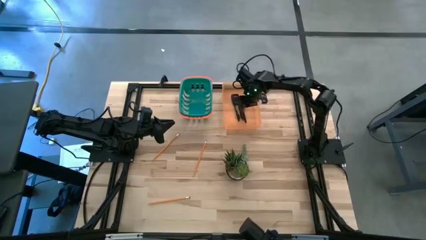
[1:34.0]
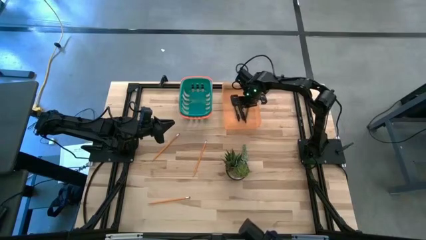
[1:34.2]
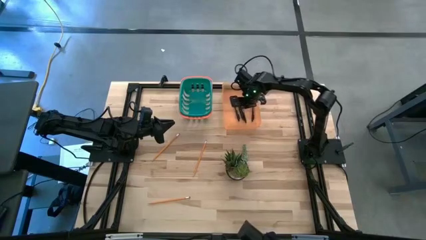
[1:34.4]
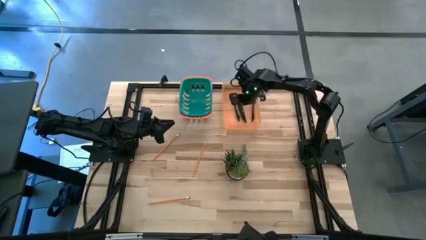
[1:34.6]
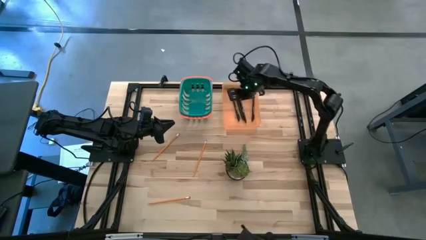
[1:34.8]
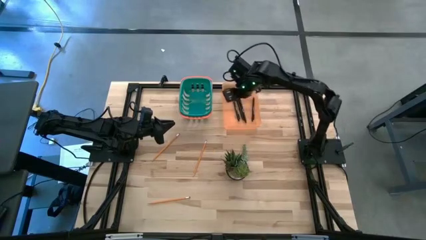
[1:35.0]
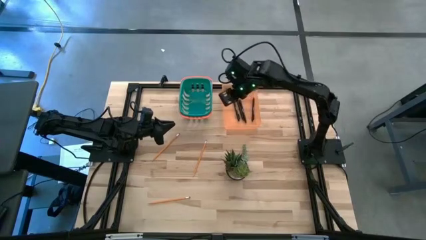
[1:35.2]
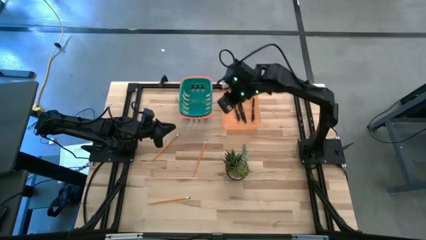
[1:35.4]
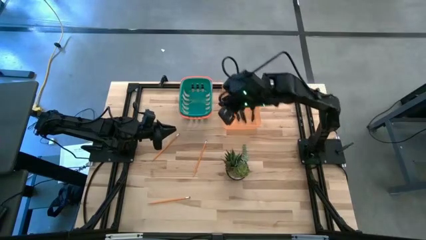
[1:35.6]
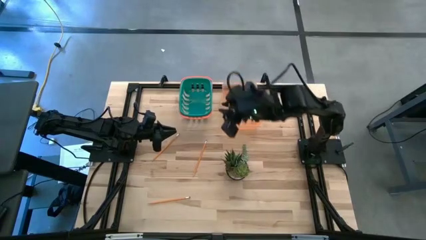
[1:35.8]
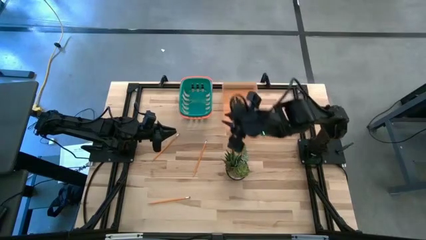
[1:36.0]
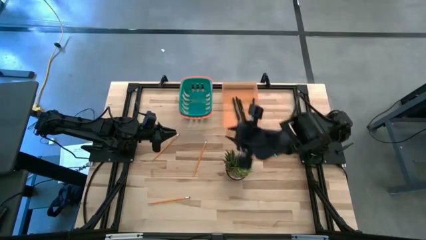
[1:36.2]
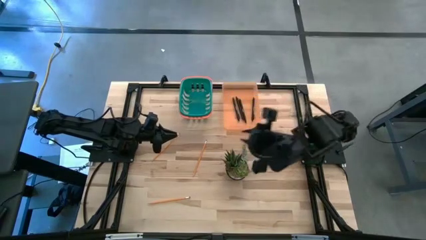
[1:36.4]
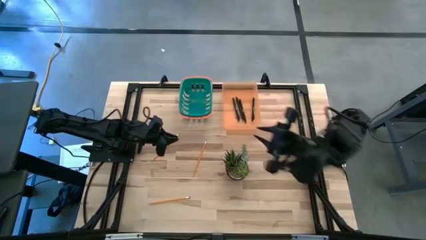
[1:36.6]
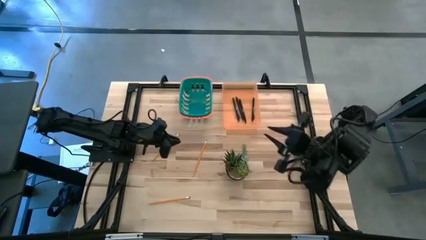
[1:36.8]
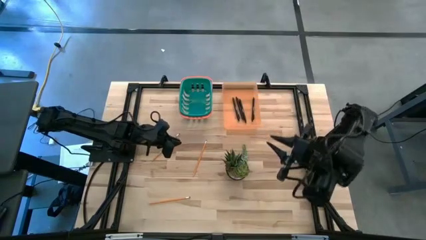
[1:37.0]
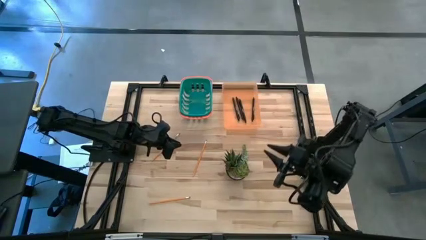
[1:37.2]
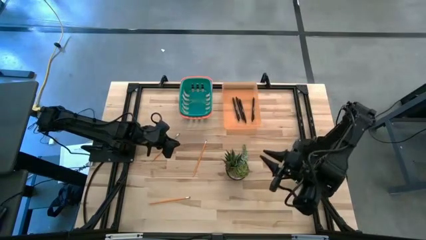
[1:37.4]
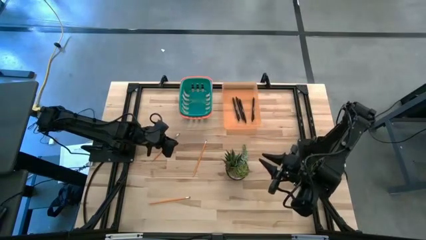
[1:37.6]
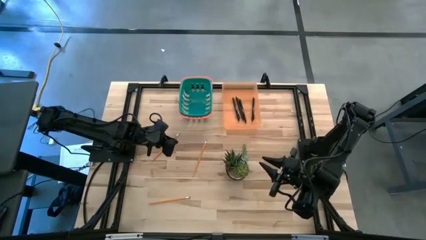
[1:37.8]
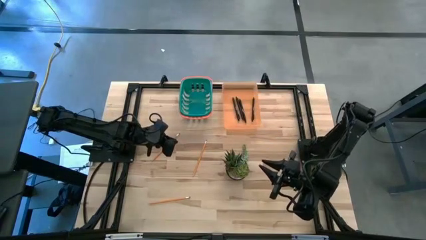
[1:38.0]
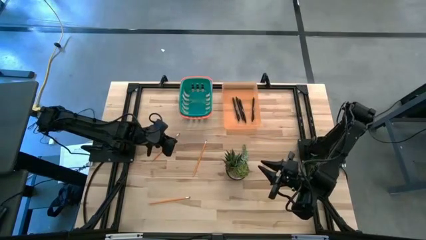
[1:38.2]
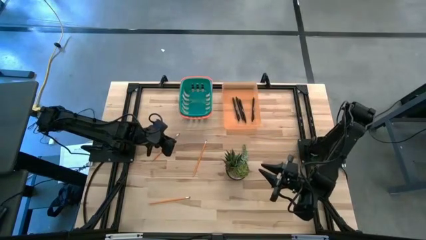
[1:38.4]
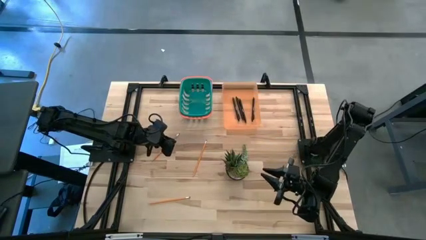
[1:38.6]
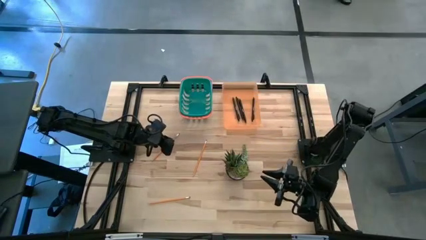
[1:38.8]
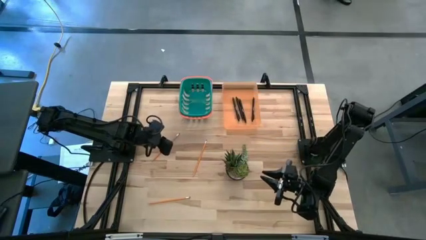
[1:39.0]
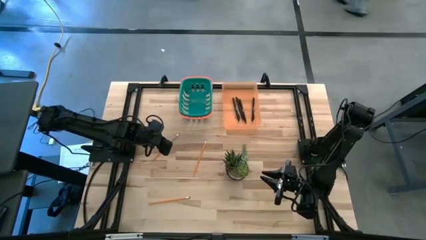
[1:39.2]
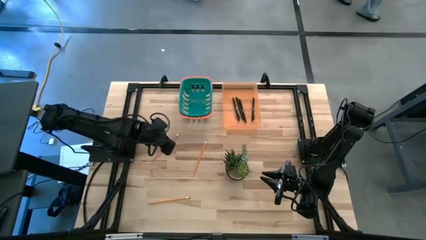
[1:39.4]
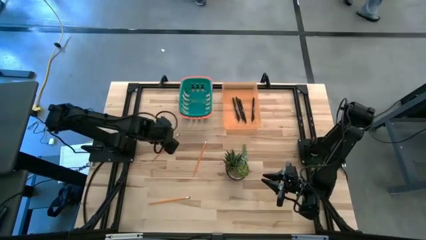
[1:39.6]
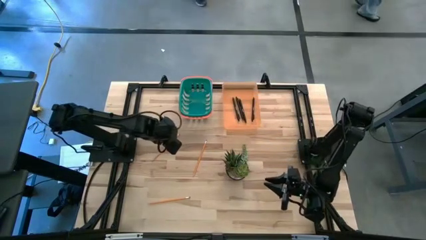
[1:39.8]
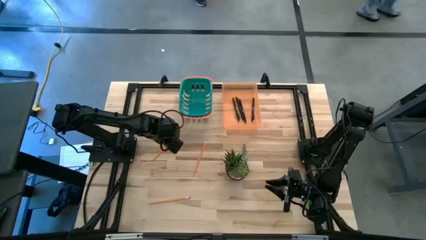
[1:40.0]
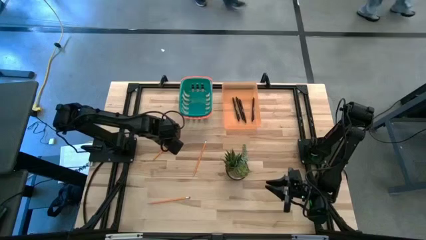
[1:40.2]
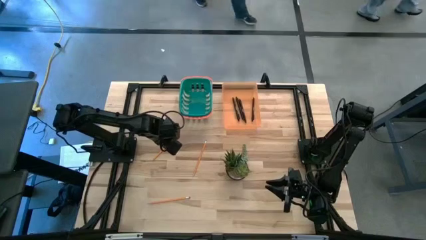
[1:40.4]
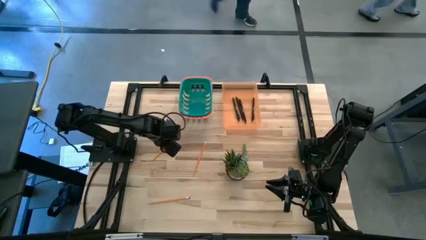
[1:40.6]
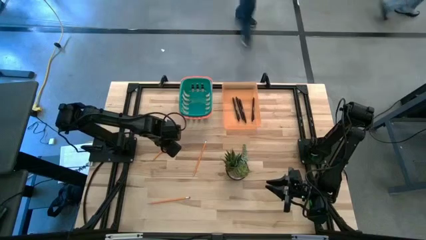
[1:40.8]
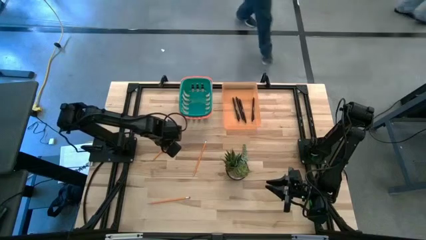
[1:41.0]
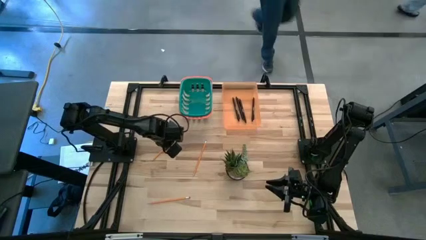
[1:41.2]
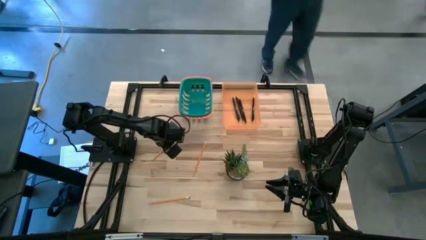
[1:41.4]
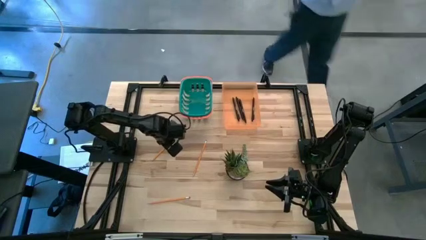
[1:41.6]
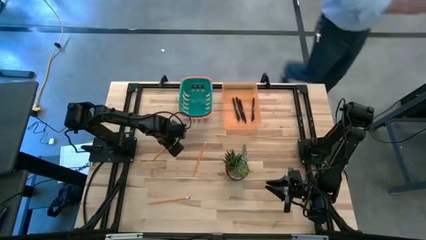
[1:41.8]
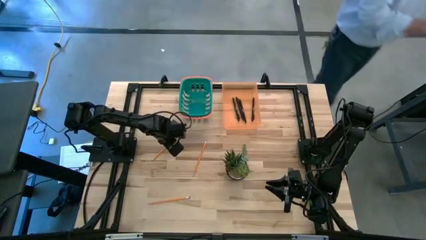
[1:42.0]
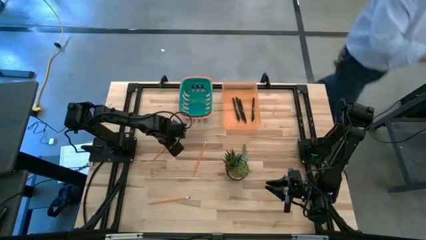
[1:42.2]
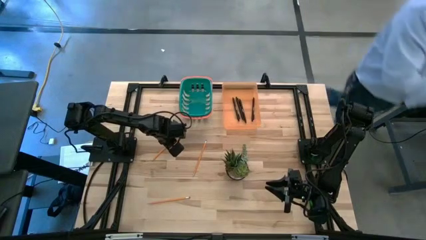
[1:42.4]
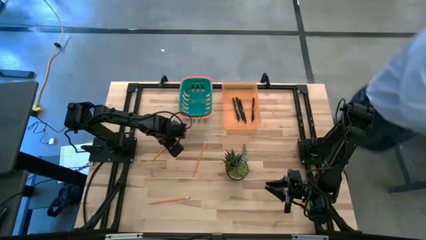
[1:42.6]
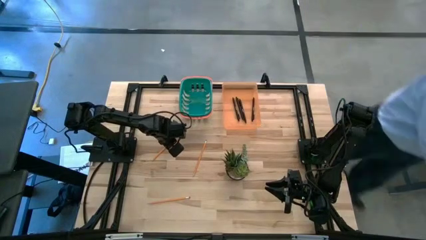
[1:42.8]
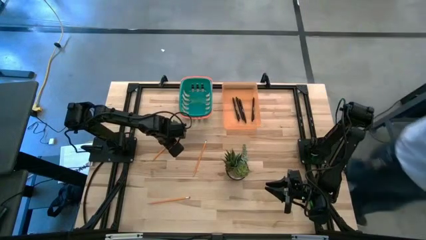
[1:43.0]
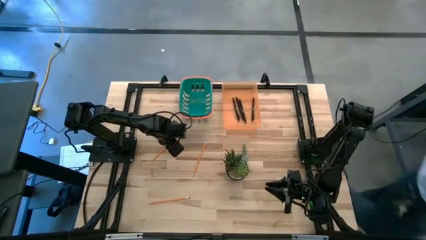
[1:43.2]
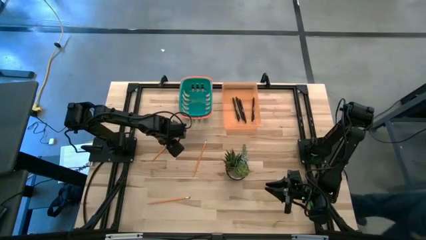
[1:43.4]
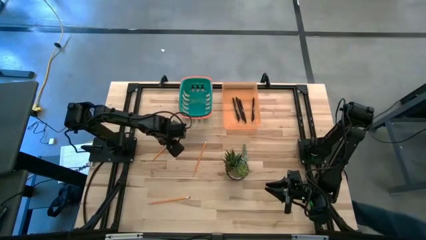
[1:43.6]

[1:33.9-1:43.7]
Task: Sort pens & pencils
Put the middle left pencil into the green bin

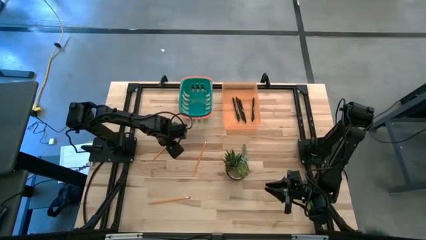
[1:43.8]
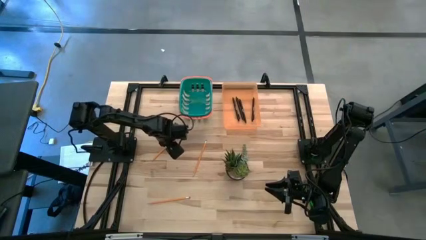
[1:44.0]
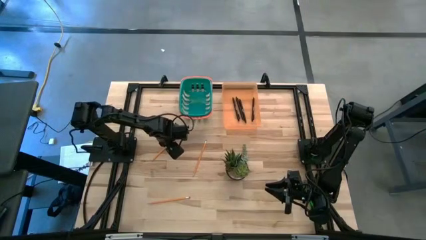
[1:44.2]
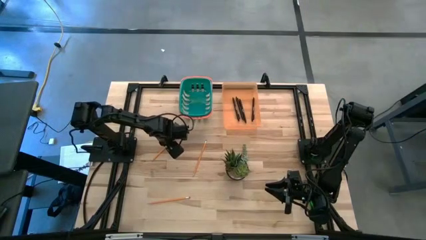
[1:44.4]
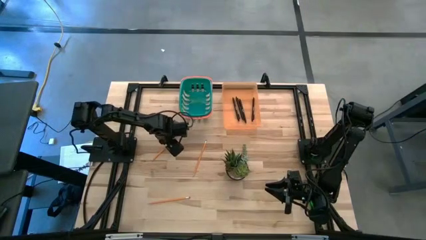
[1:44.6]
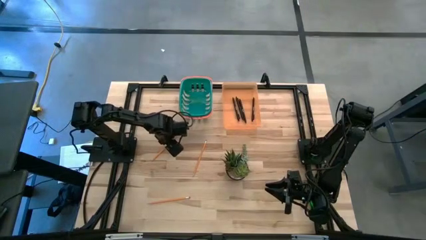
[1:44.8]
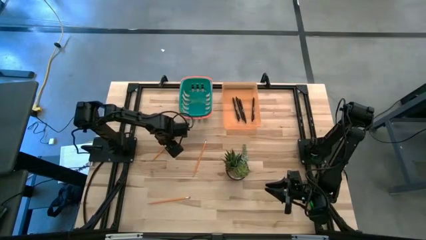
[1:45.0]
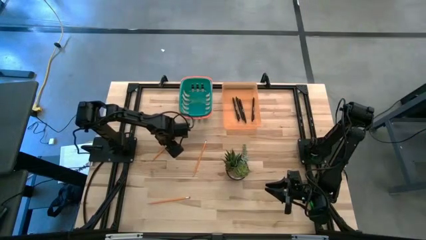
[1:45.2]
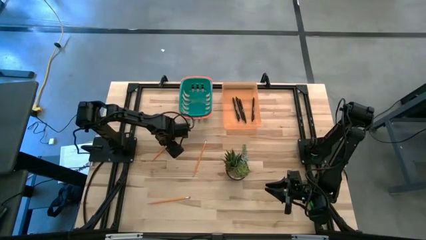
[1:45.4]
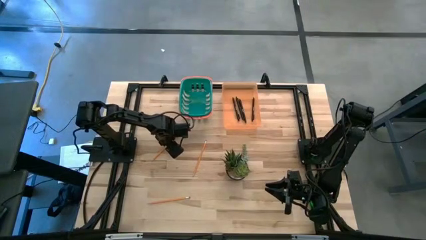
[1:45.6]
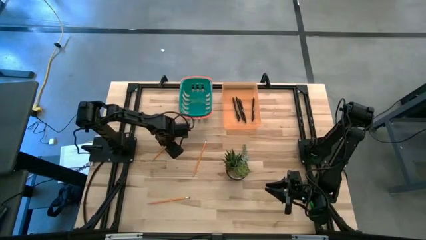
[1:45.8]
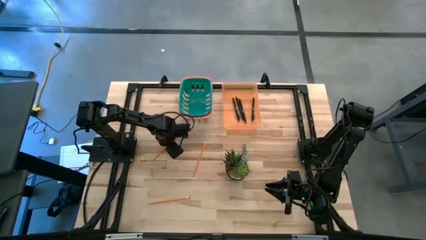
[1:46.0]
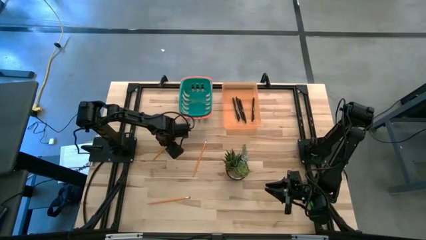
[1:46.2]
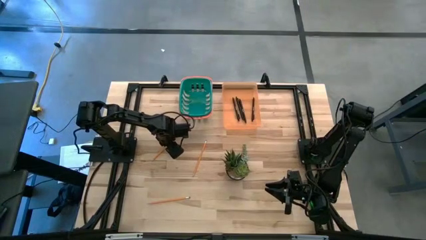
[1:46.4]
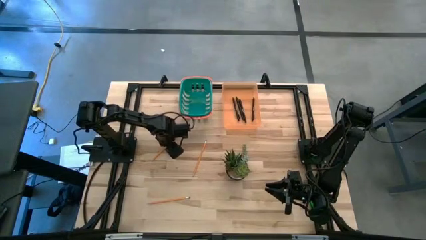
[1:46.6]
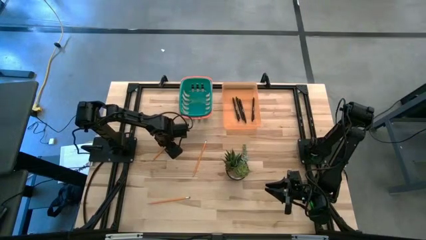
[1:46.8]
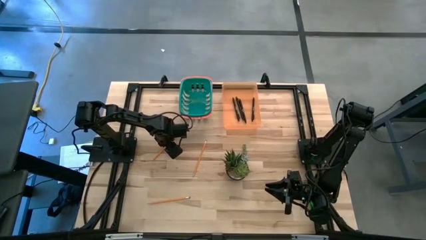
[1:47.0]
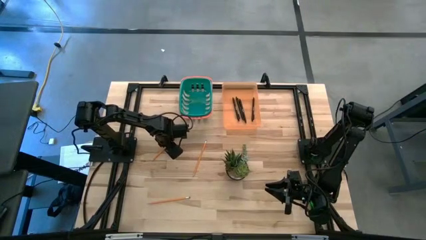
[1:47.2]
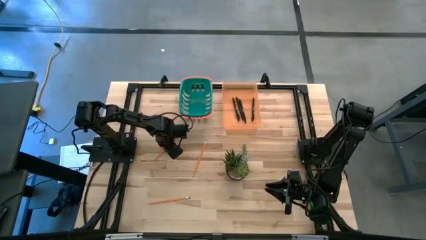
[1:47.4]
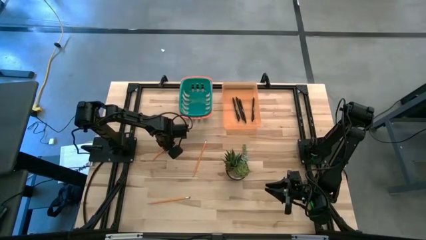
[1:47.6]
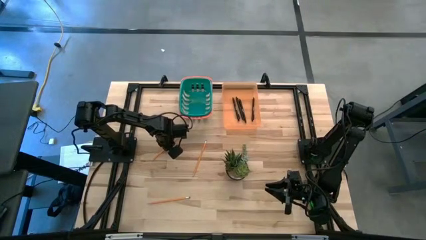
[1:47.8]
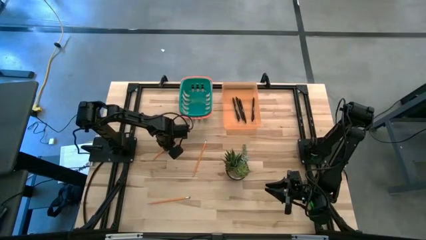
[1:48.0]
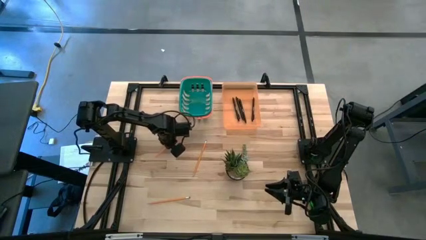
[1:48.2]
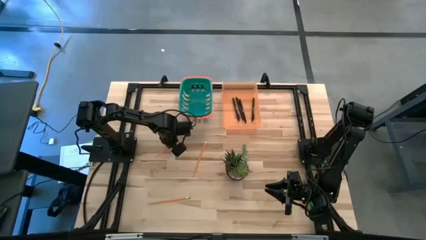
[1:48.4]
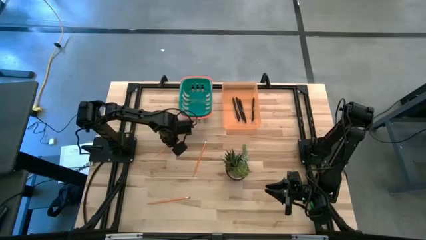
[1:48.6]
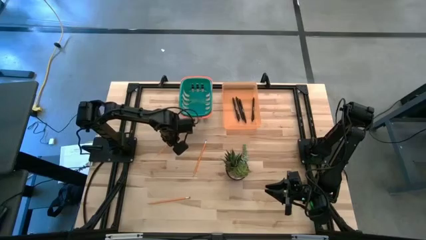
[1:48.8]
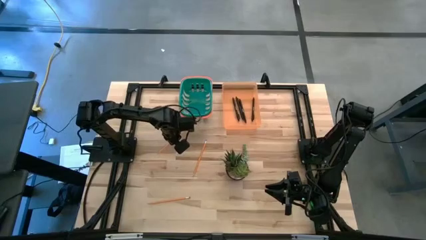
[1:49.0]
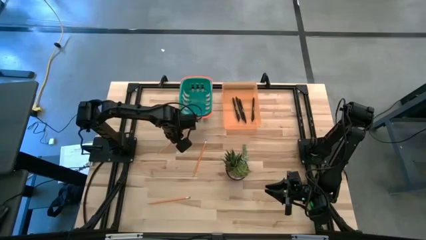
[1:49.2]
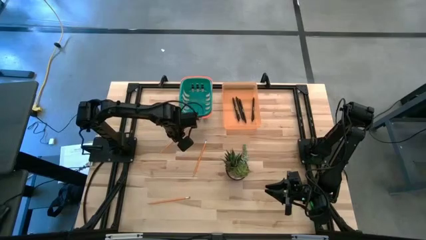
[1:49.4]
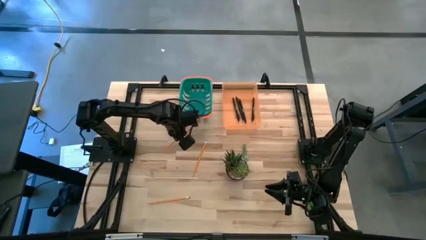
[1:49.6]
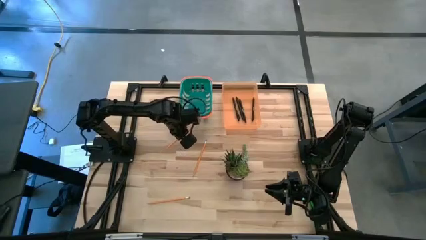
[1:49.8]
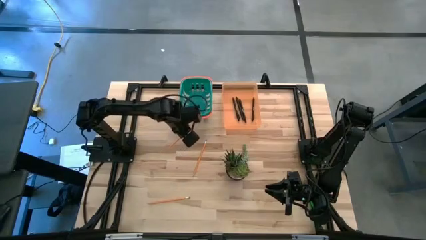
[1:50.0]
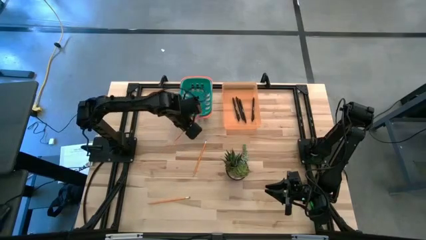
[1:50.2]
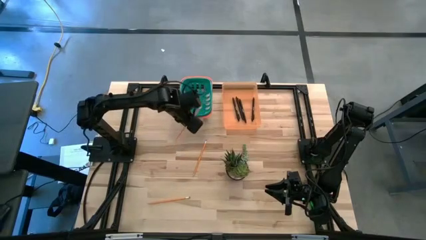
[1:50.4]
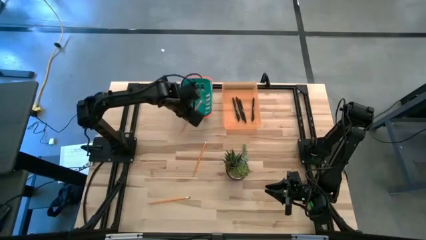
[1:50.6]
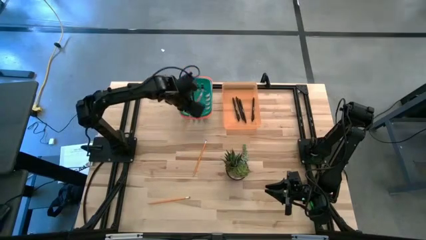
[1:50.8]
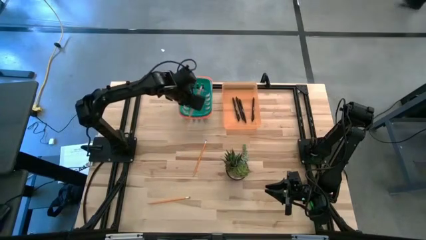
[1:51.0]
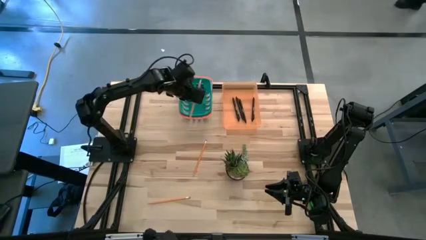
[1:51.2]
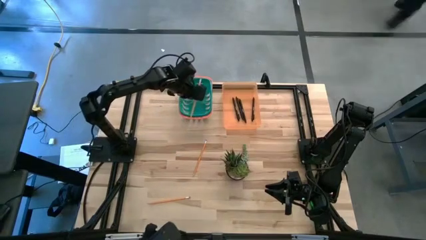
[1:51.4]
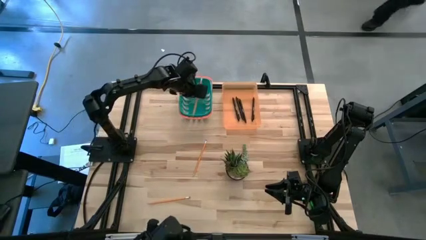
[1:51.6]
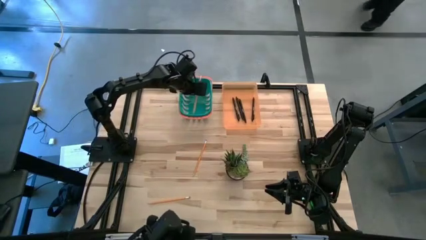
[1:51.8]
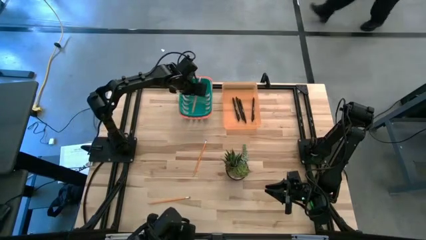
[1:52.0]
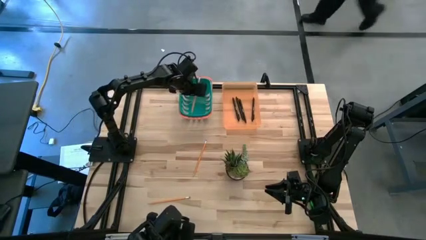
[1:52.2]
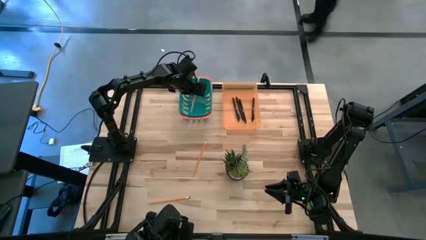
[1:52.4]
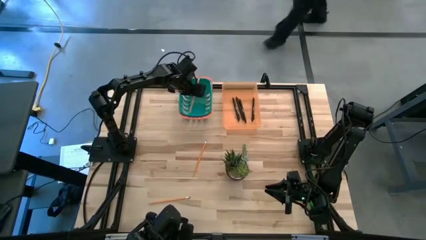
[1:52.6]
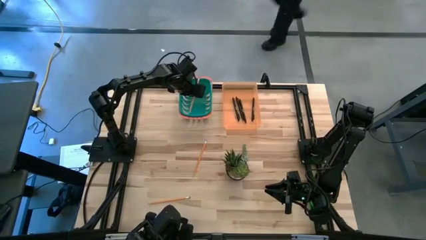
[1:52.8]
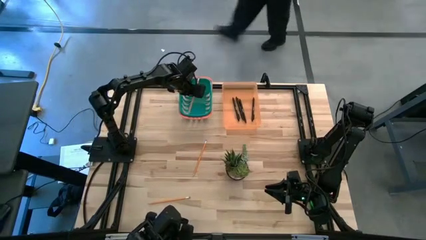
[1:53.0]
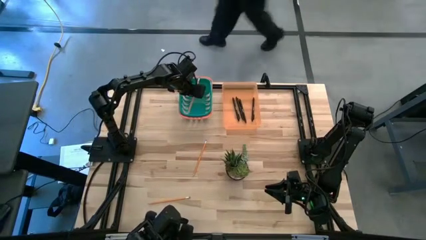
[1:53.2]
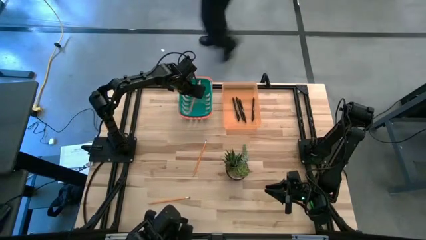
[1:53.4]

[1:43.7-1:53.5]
Put the middle left pencil into the green bin
